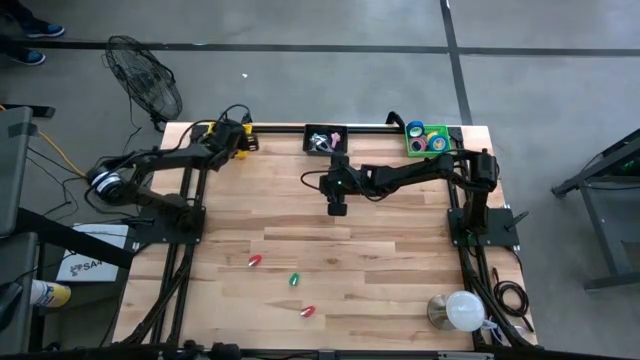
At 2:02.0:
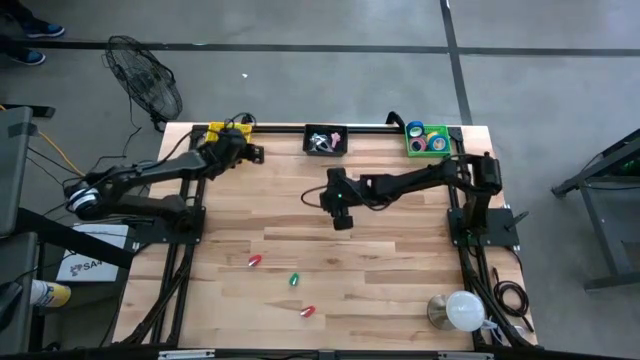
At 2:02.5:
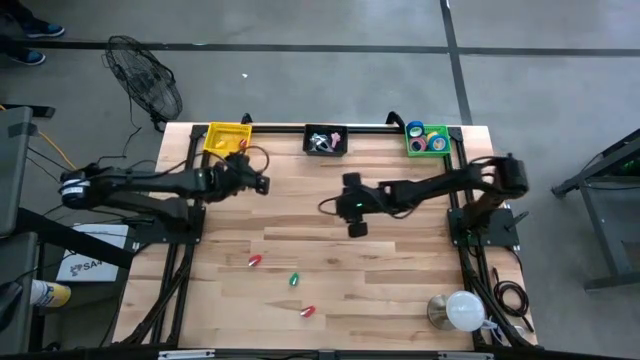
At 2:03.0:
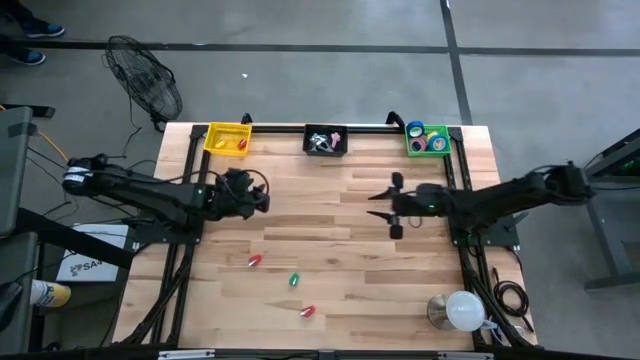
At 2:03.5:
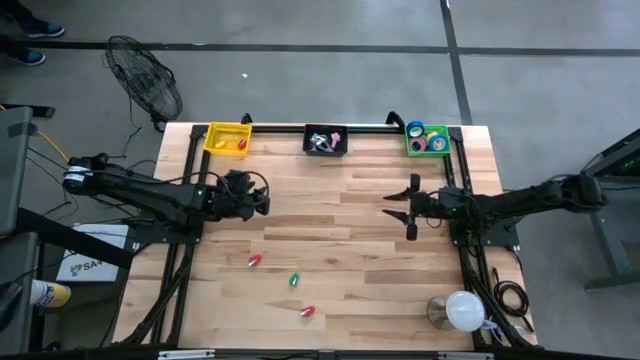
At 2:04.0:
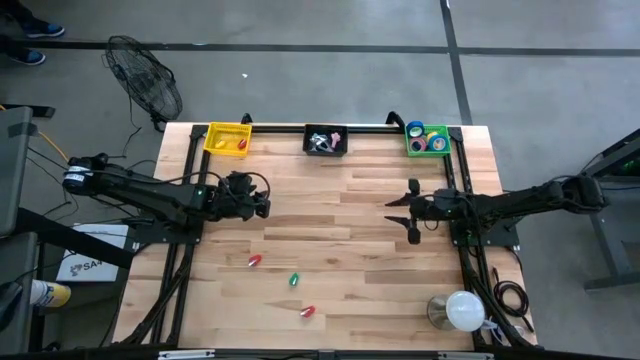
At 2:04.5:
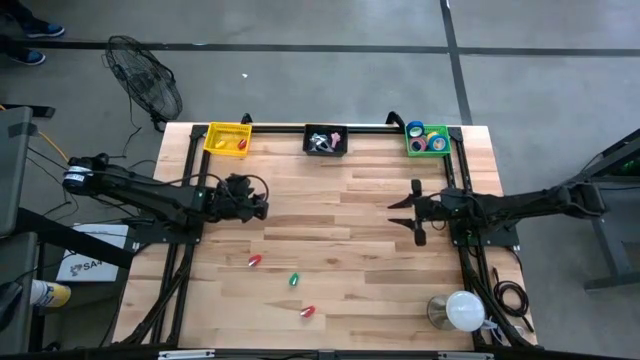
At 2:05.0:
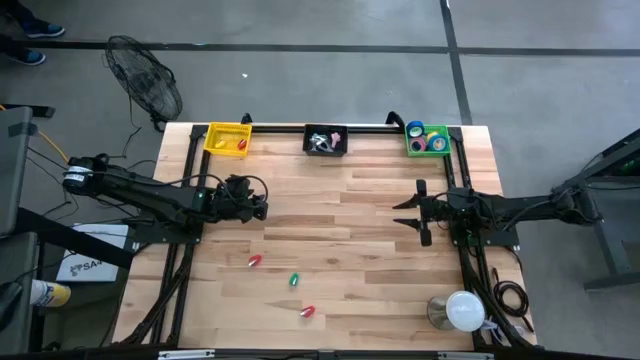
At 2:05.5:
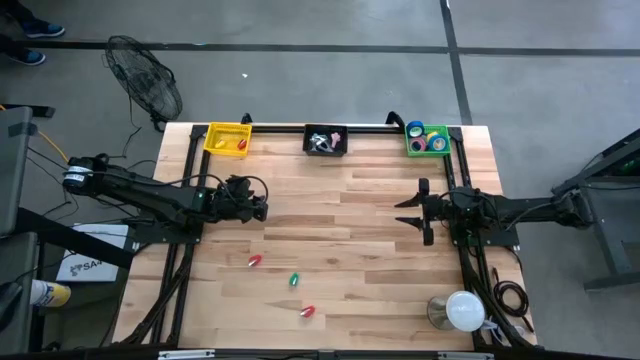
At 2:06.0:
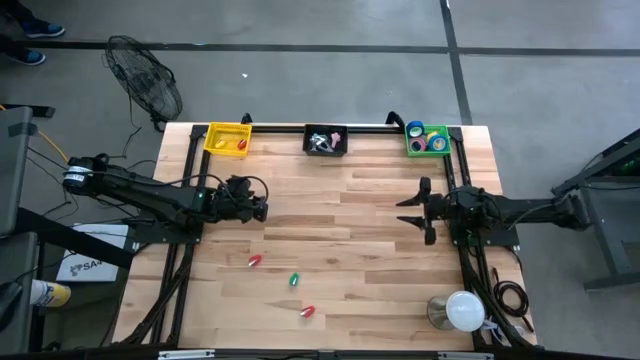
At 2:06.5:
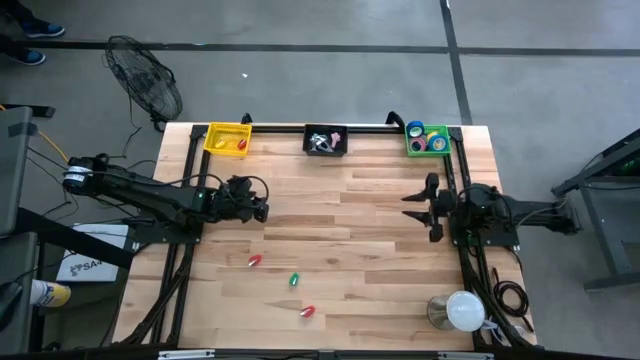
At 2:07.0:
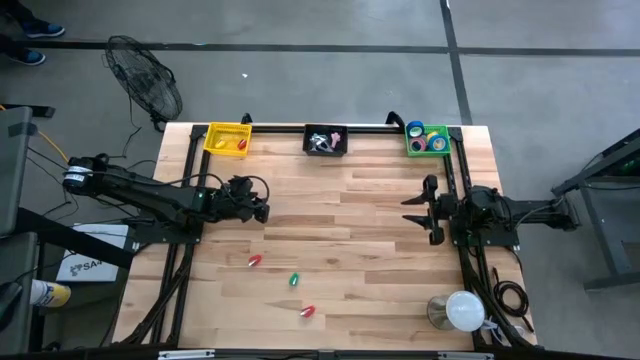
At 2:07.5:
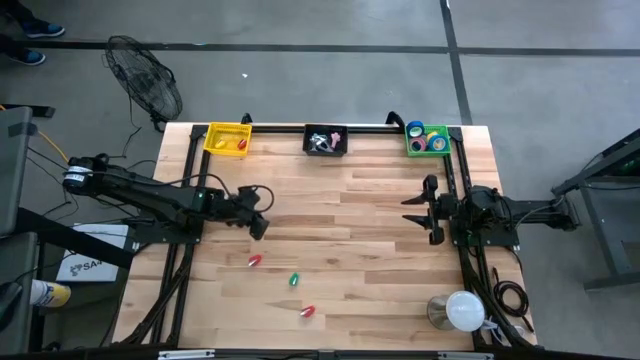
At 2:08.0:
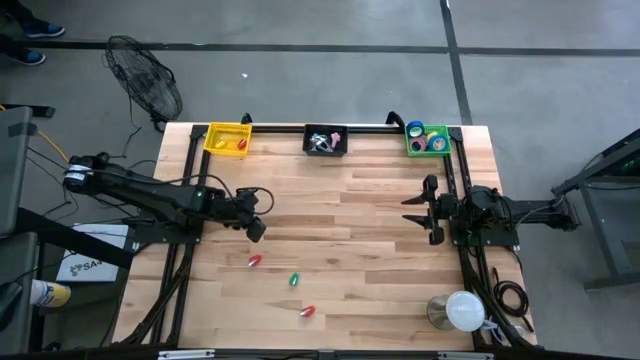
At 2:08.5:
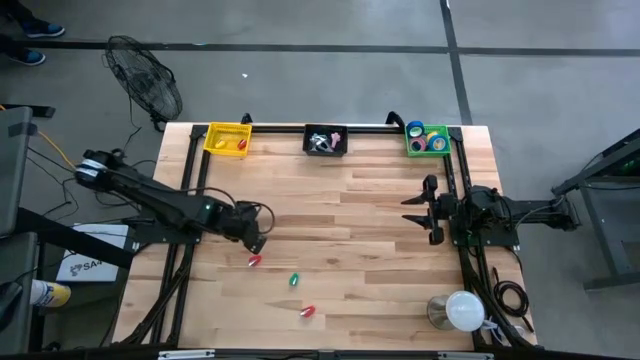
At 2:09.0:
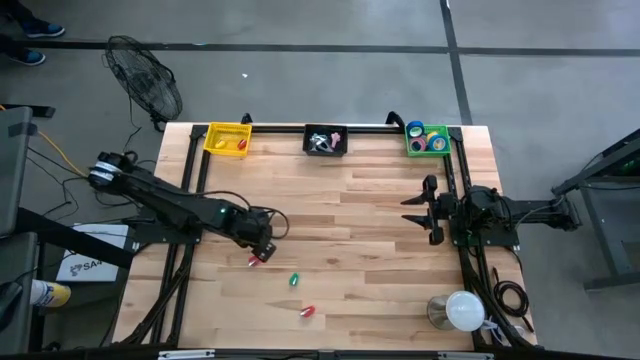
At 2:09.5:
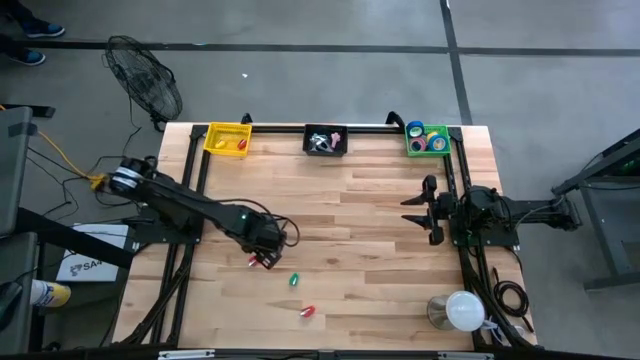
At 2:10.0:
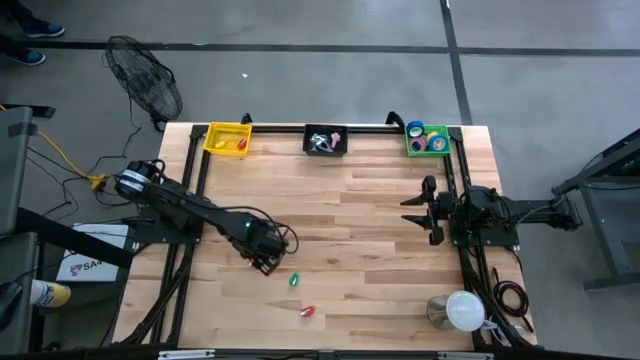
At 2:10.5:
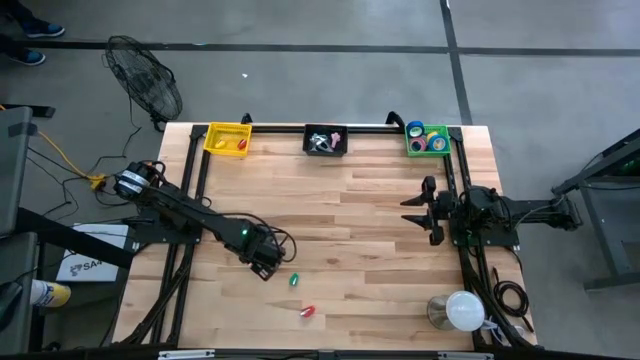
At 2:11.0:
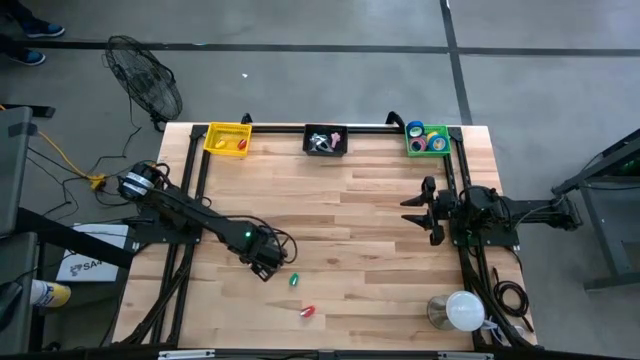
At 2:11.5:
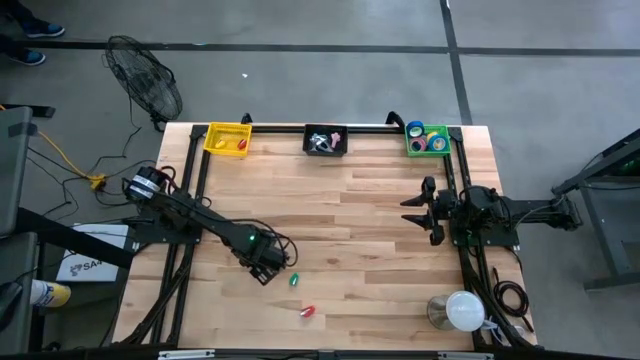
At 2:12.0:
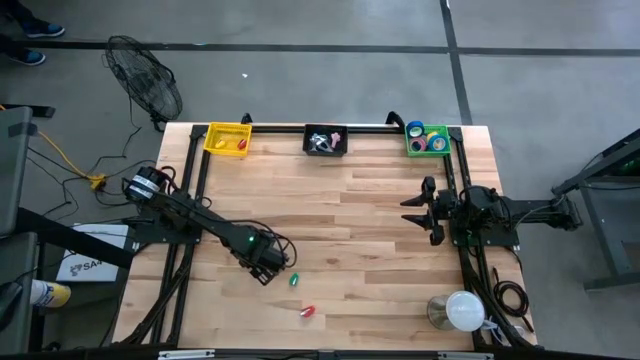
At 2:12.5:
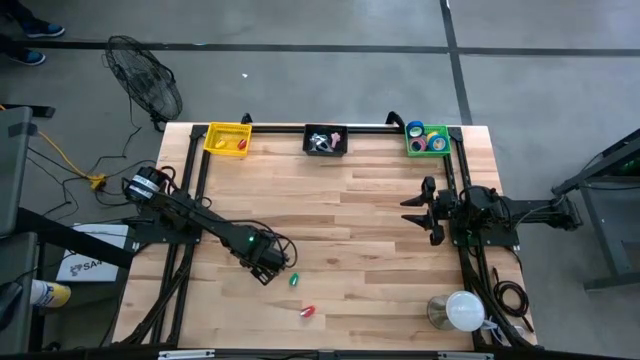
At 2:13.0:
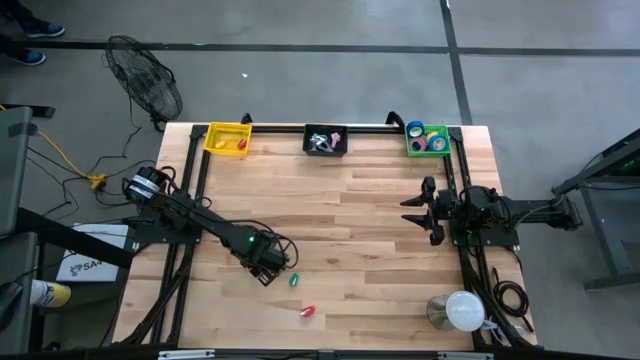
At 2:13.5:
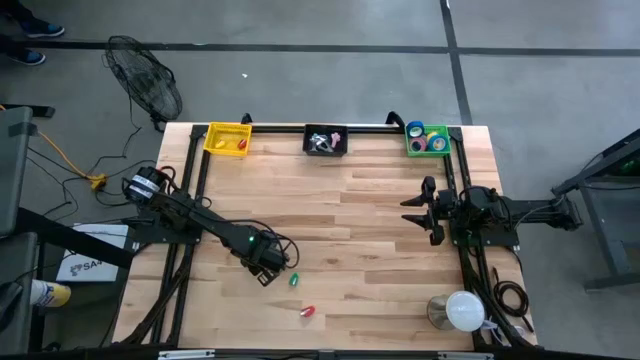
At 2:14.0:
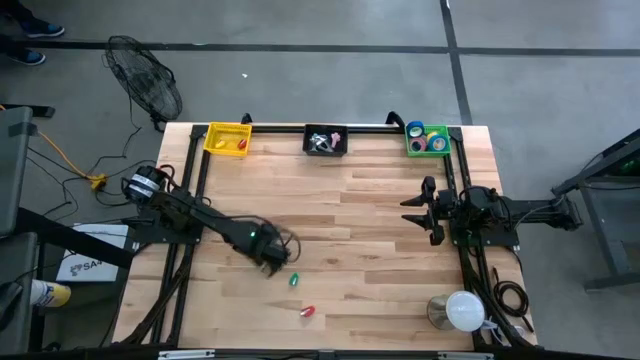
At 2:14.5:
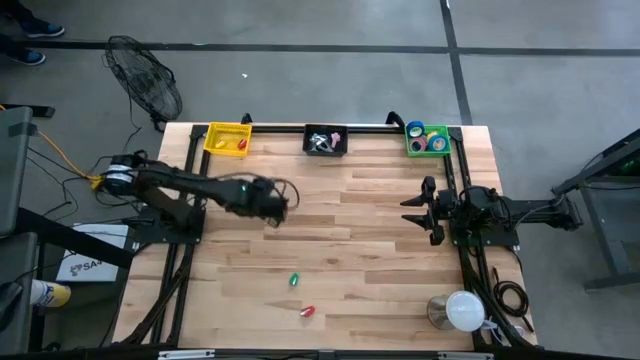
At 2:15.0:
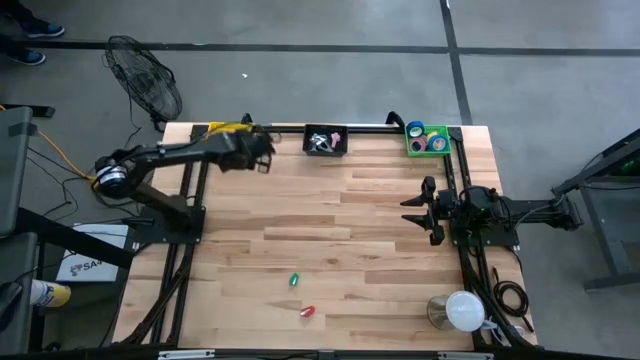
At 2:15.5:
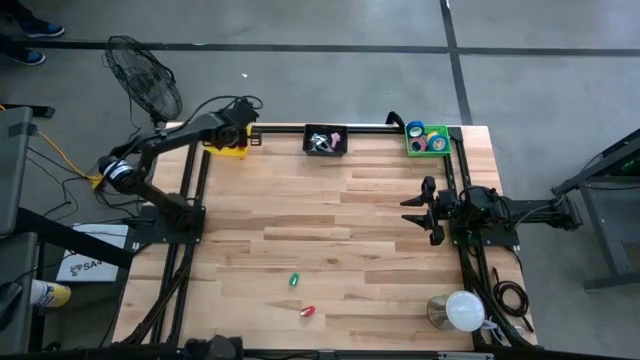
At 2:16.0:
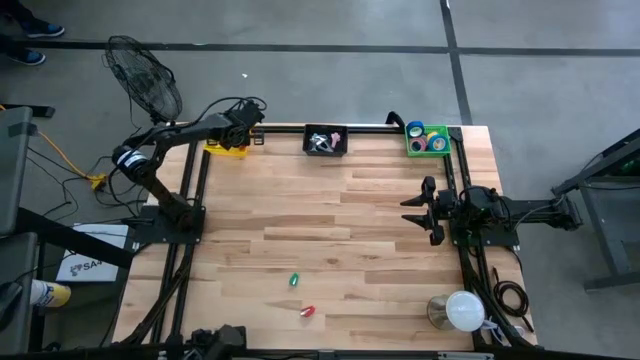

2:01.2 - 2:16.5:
Task: Pick and place Stapler, Stapler remover, tape
Put the top red stapler into the yellow bin

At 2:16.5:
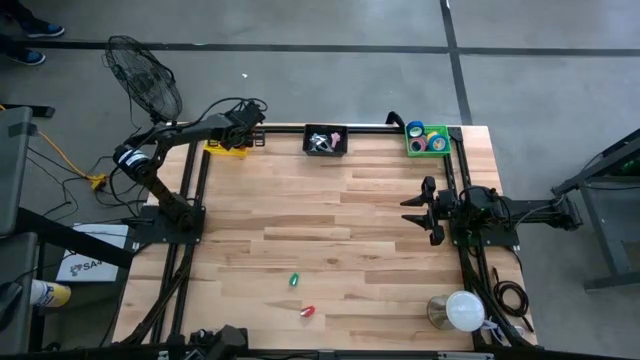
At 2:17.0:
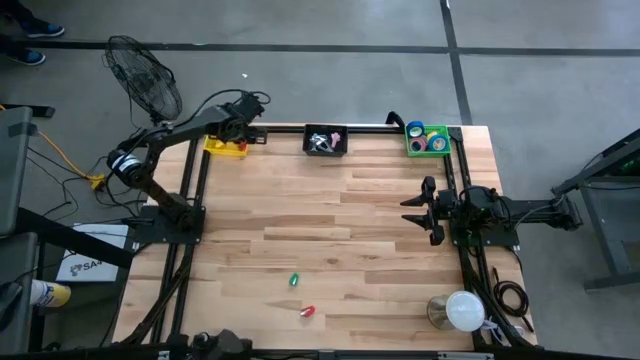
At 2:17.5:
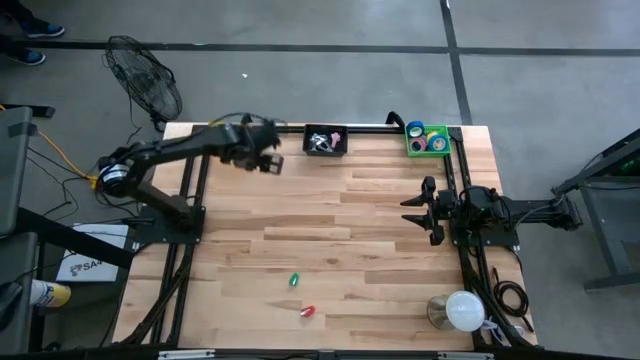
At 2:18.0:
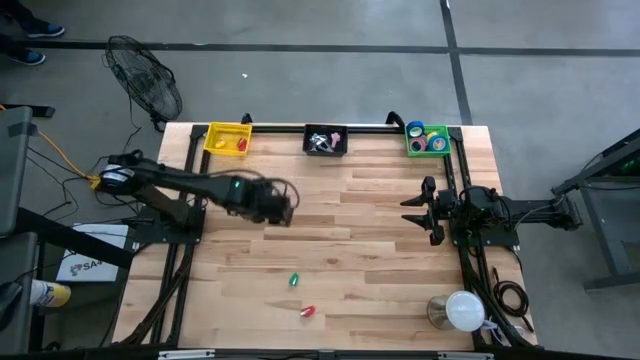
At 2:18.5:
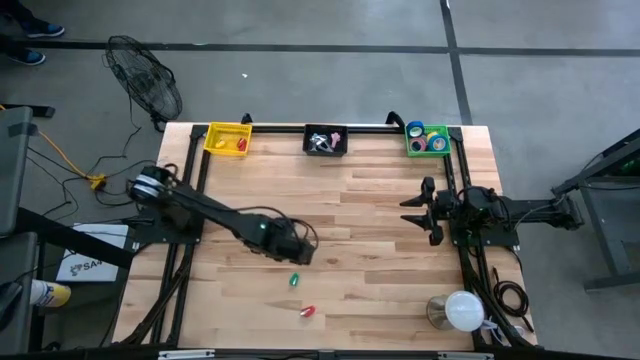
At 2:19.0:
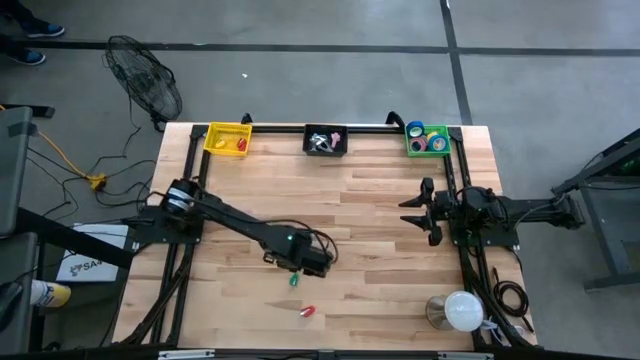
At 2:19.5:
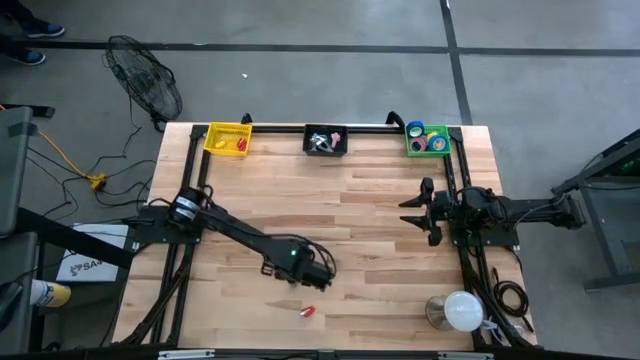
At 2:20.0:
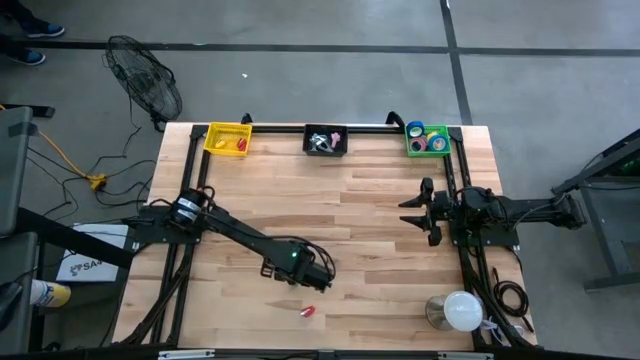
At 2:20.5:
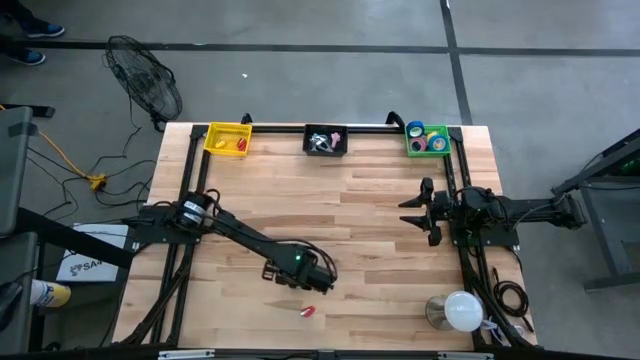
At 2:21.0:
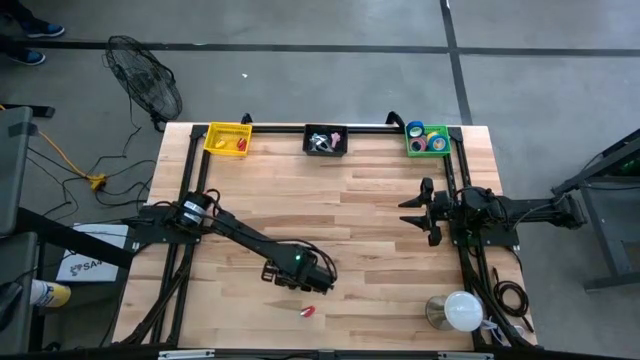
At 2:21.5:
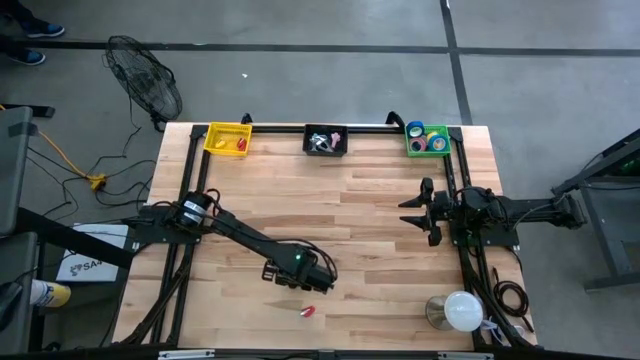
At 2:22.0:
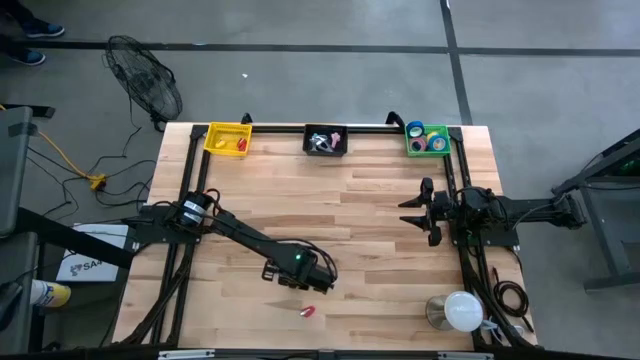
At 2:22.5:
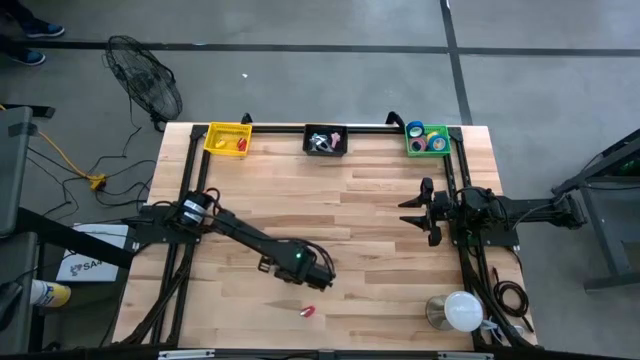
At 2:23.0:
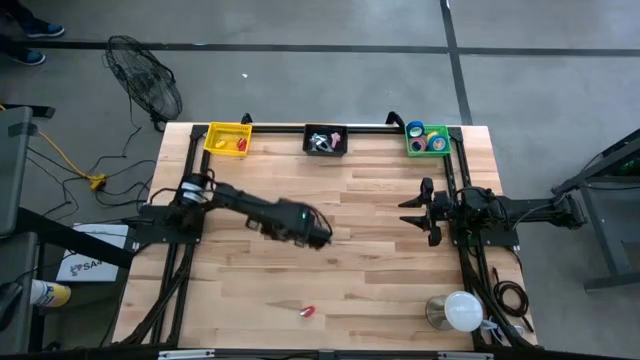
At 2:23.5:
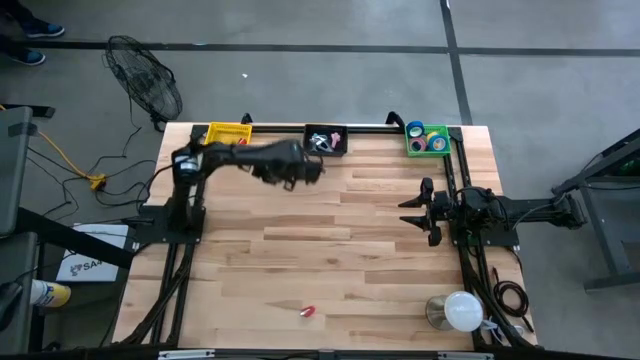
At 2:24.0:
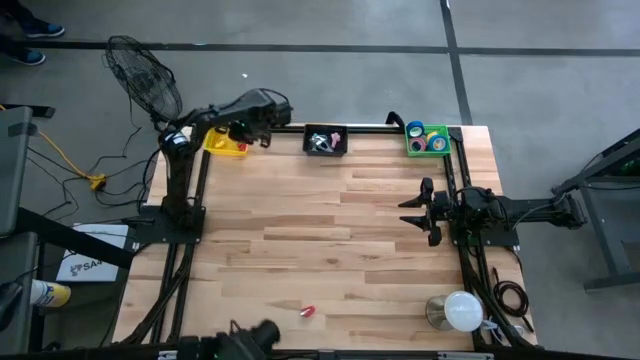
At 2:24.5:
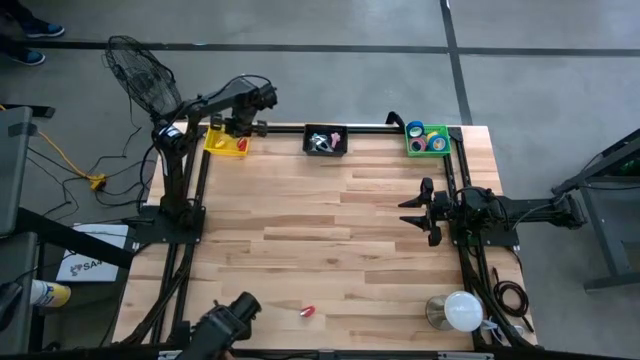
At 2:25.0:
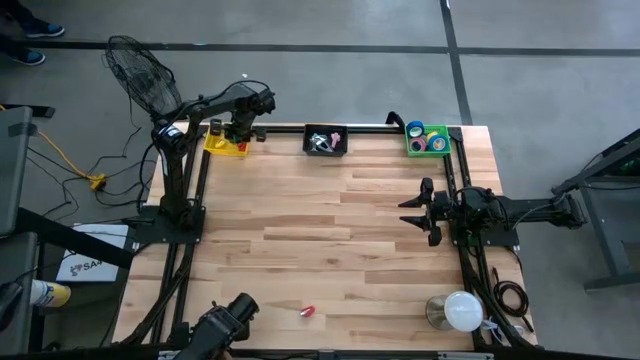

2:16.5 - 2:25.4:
Put the green stapler into the yellow bin
